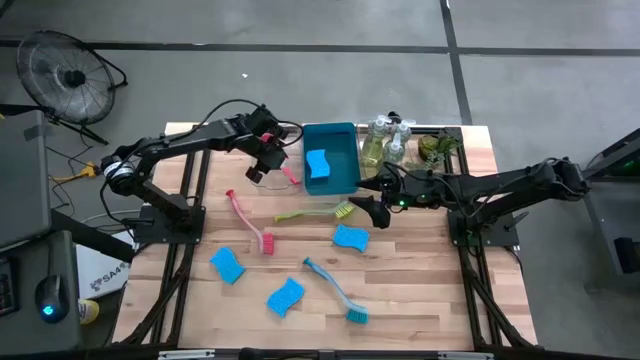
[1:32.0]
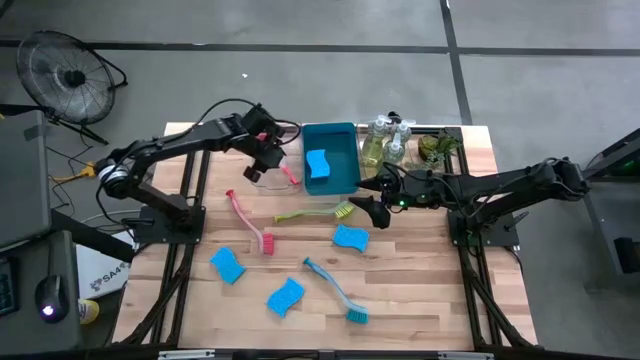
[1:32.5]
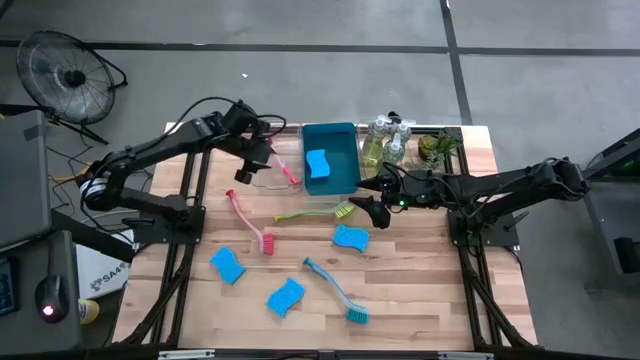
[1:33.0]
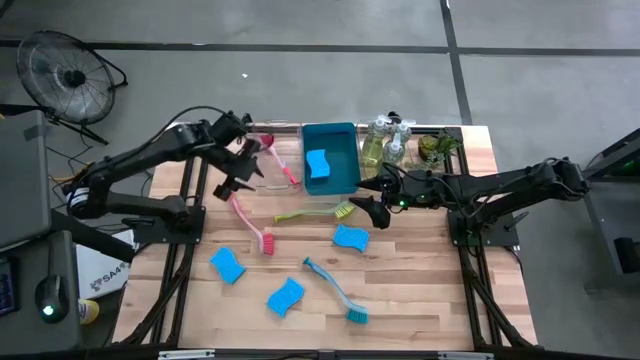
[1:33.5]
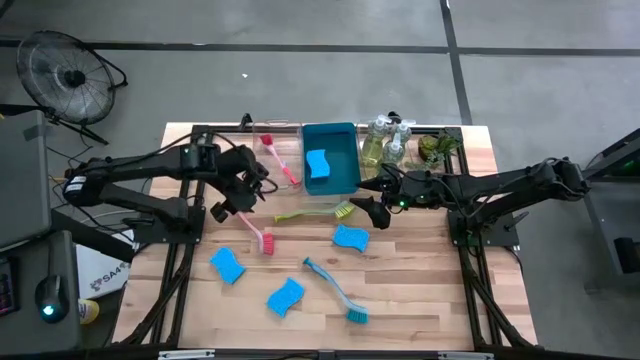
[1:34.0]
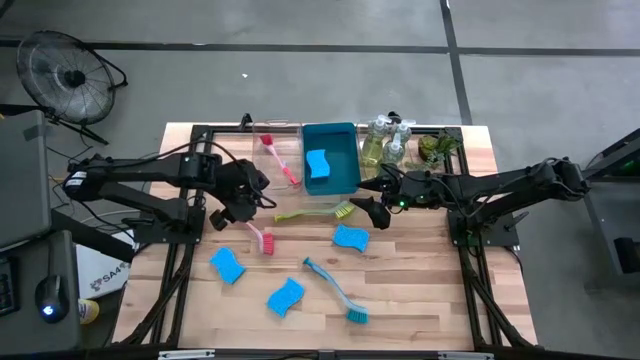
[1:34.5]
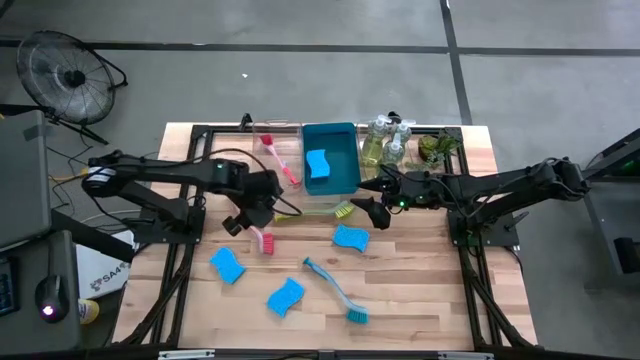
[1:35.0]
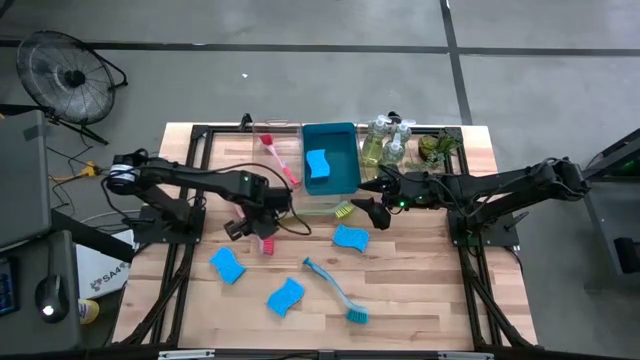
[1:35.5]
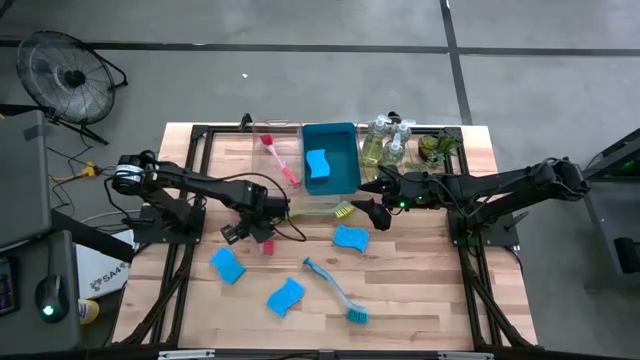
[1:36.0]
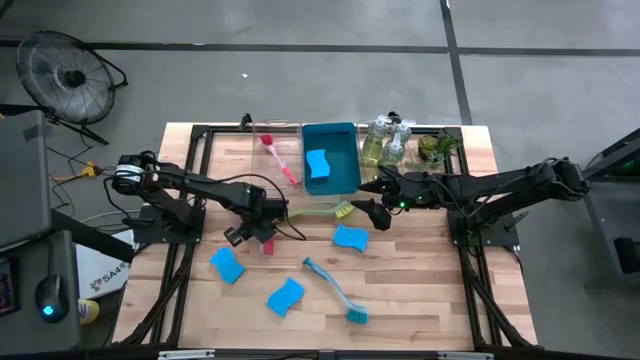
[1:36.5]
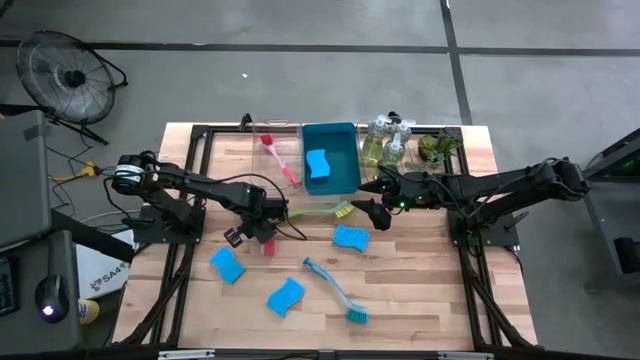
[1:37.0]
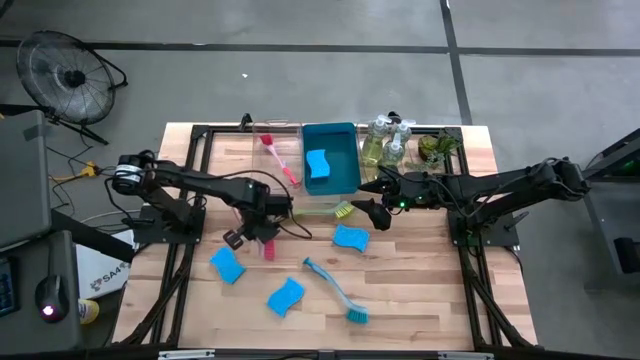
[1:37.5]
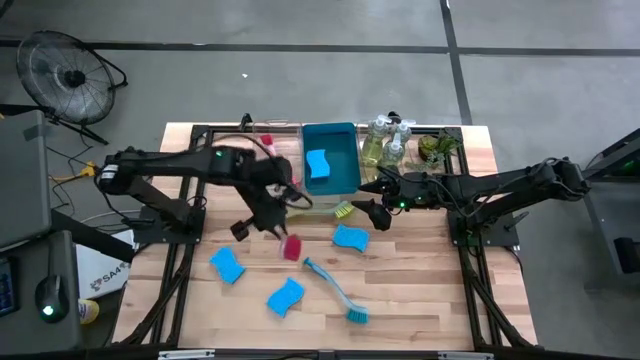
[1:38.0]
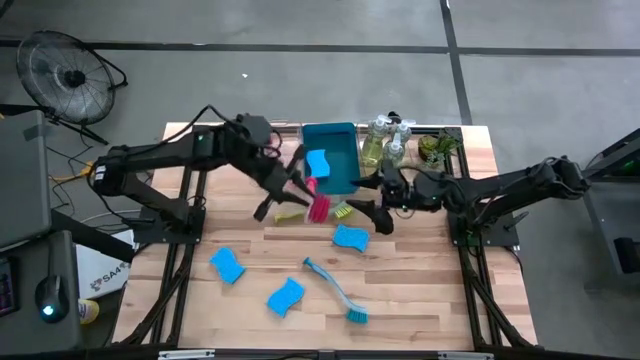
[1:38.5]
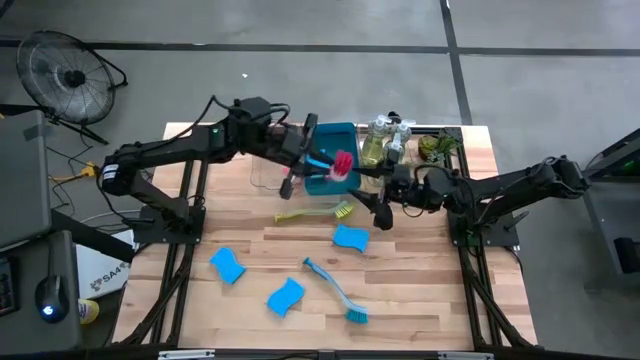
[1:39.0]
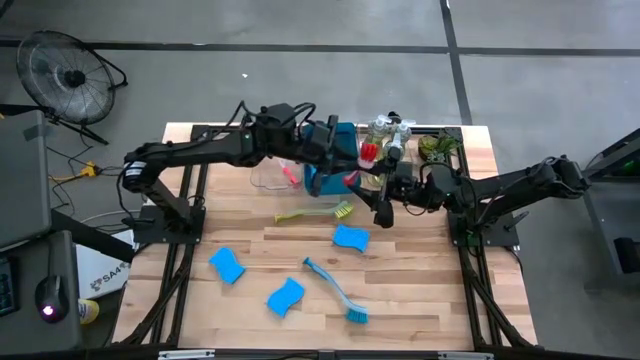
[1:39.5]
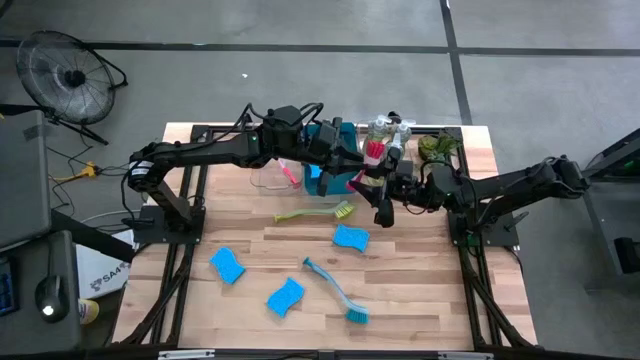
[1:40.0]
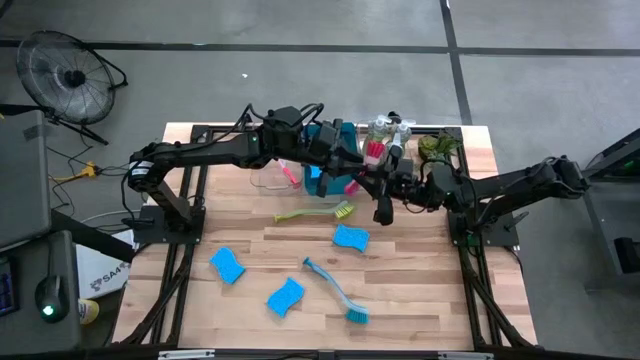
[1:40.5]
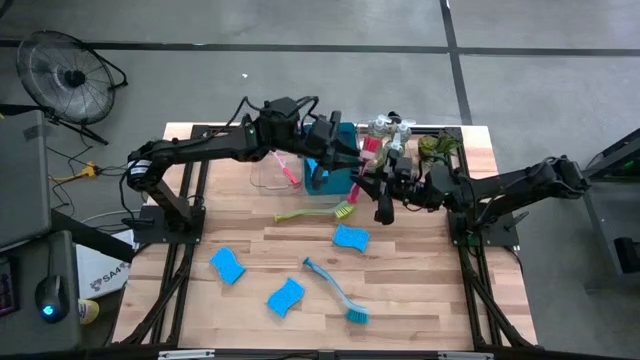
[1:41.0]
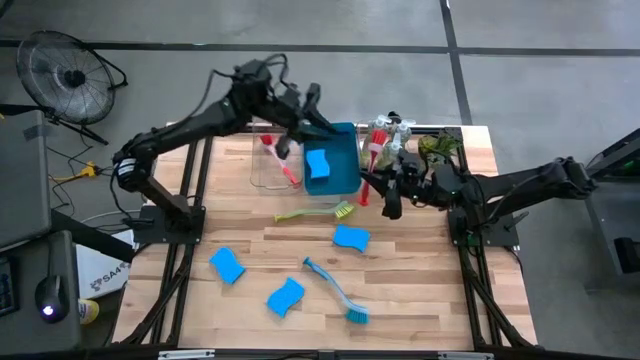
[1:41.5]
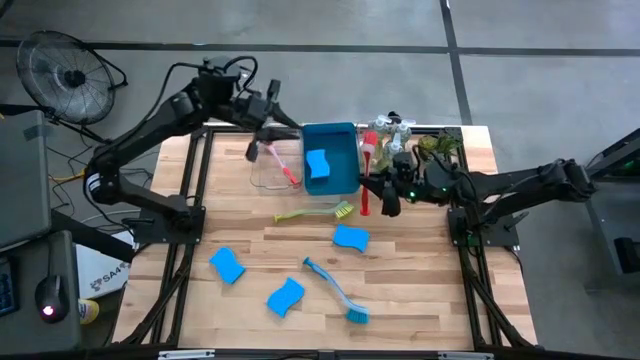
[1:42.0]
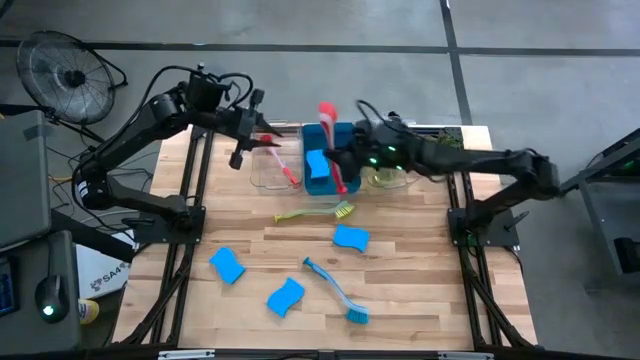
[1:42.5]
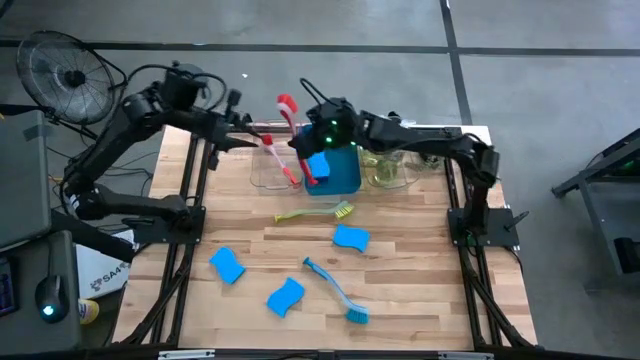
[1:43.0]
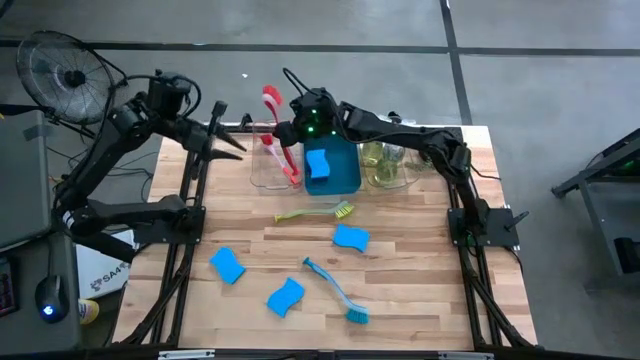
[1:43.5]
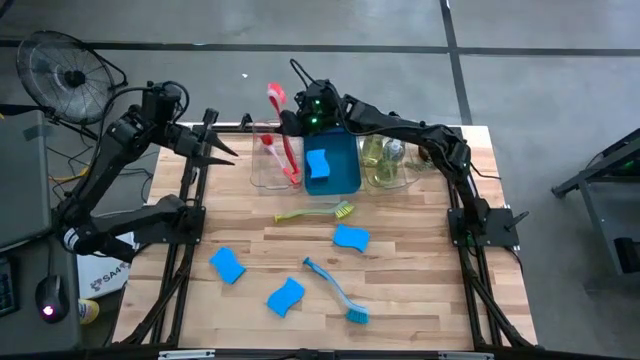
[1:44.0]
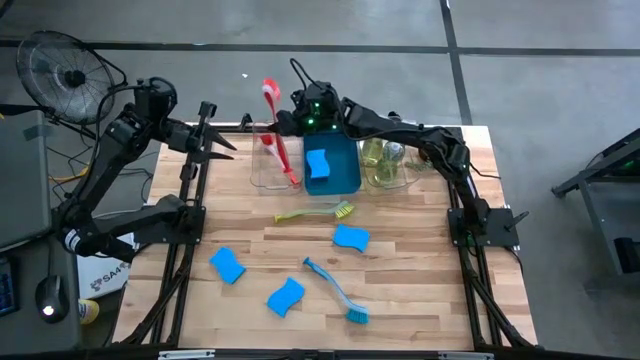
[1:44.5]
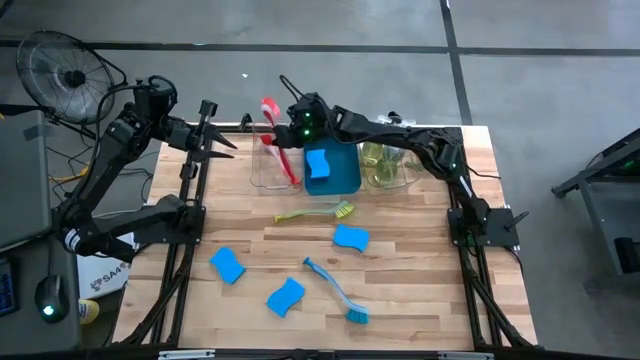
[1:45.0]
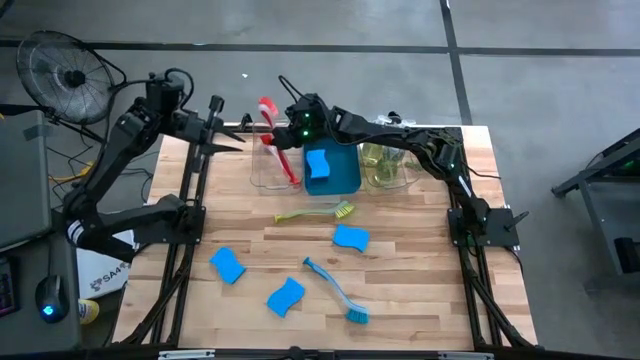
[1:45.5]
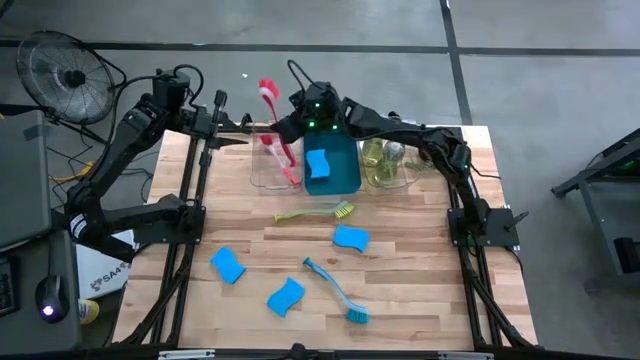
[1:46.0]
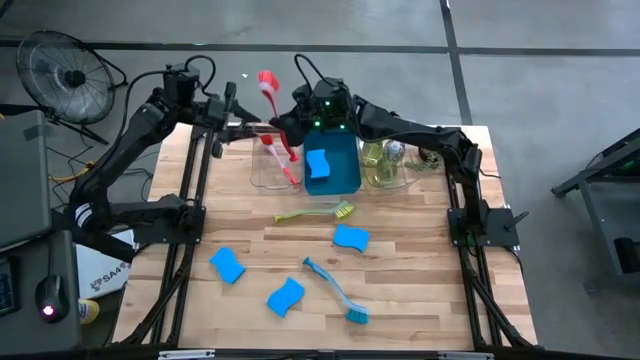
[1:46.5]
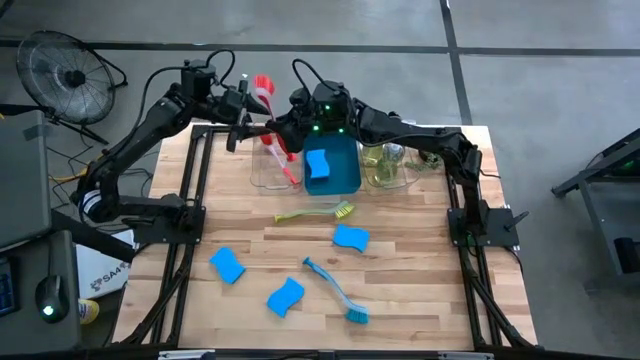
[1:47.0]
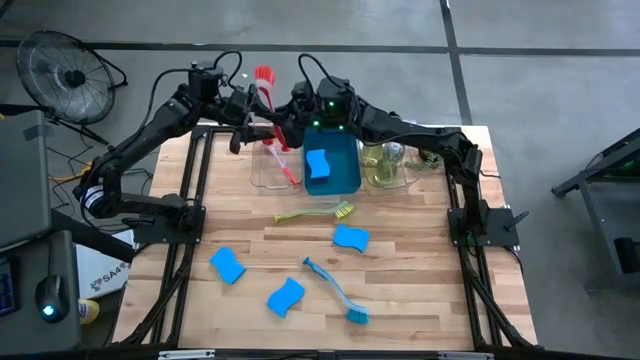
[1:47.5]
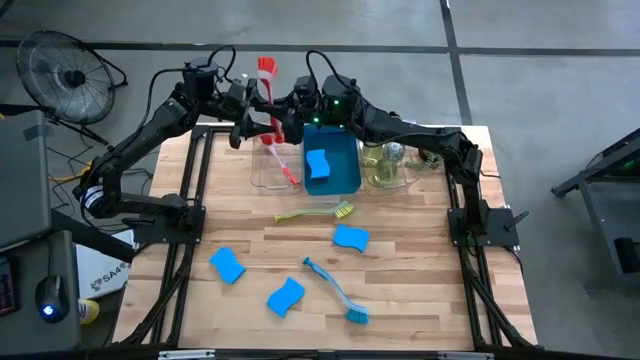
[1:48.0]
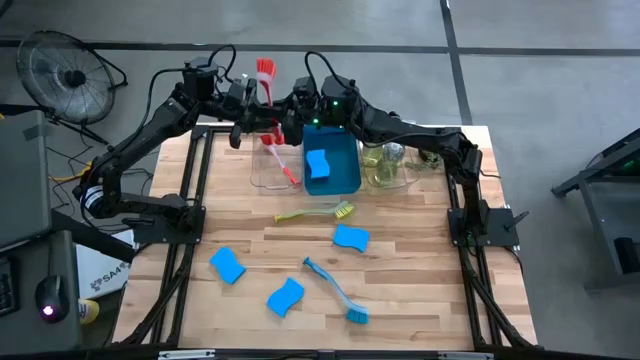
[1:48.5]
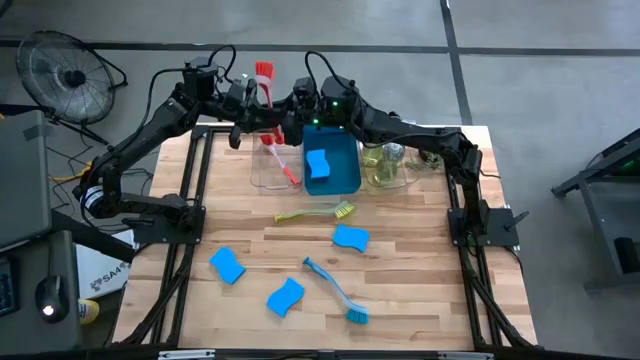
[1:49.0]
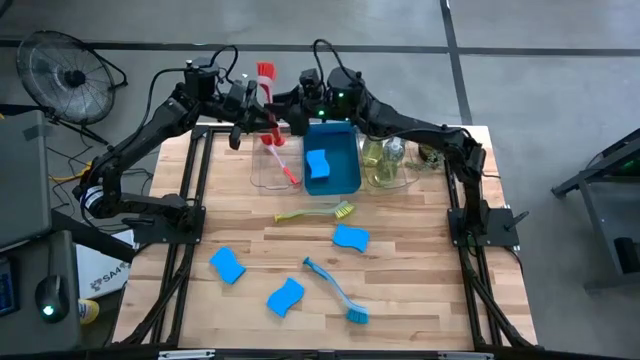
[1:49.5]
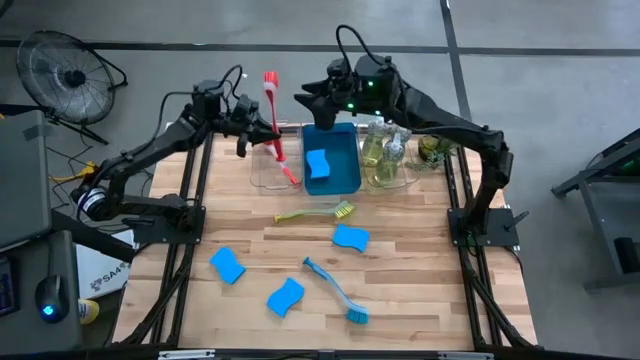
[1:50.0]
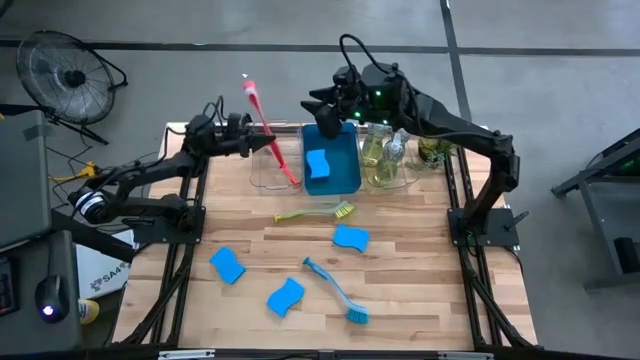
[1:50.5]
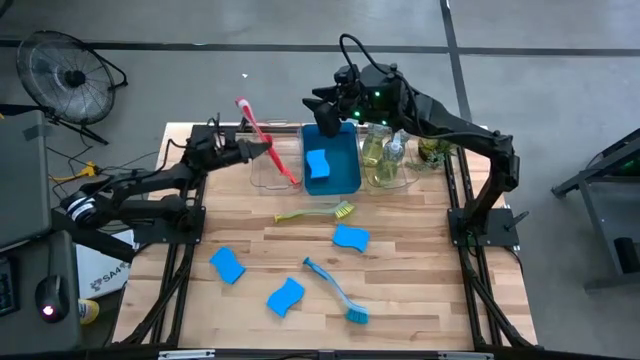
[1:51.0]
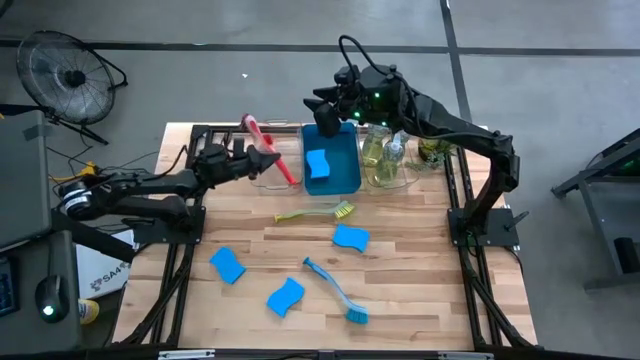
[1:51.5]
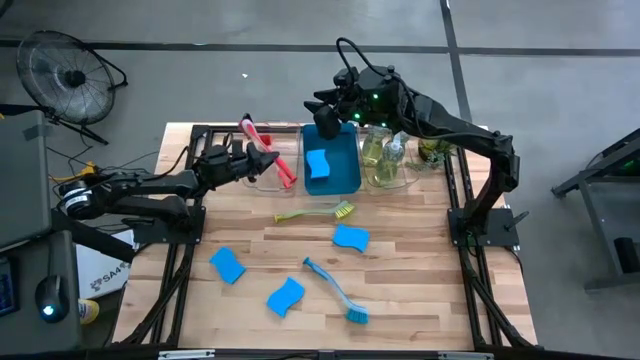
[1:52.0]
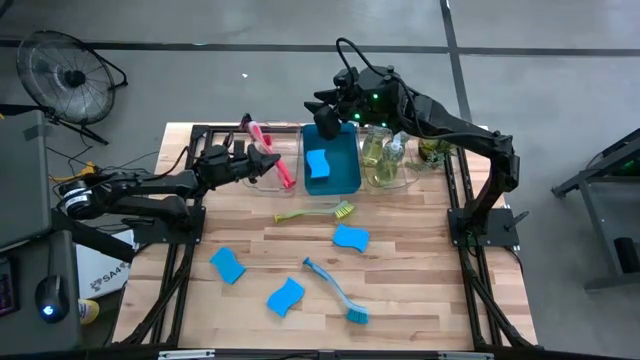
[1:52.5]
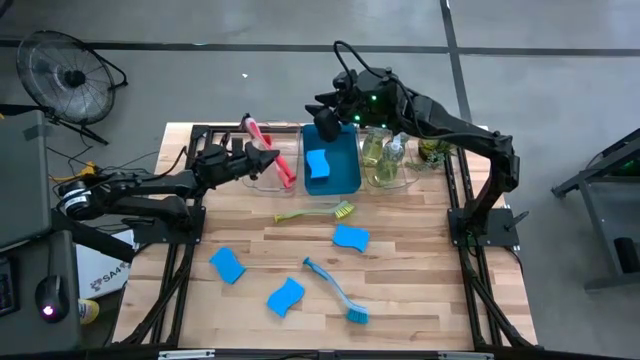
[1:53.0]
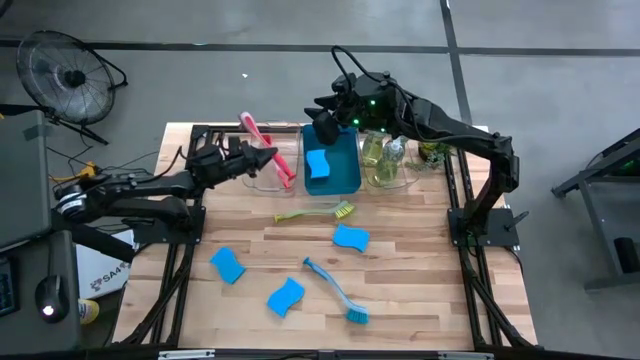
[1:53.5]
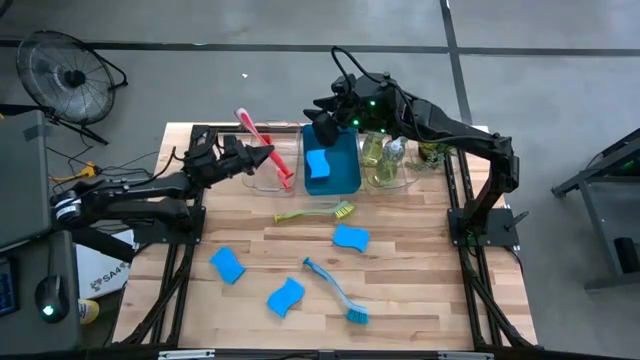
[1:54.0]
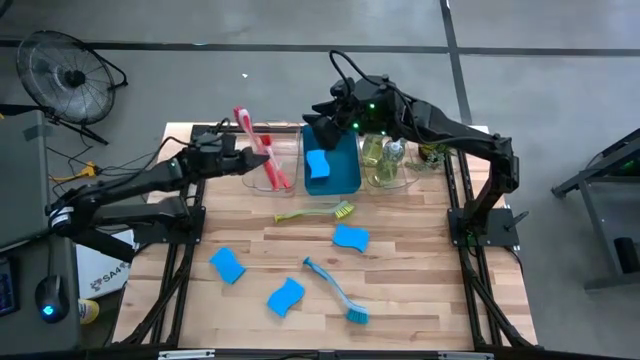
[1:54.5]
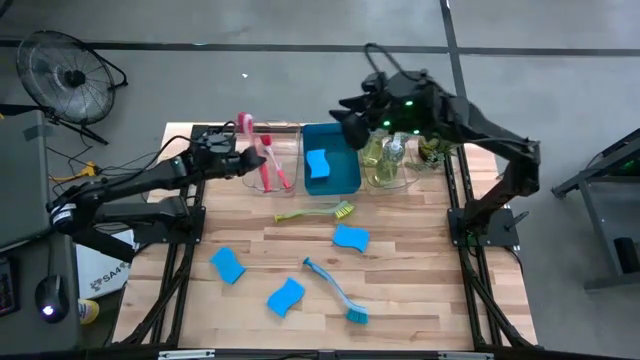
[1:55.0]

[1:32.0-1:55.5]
Task: Pick & Place Kitchen Sink Supplies
Put the red dish brush into the left transparent bin
